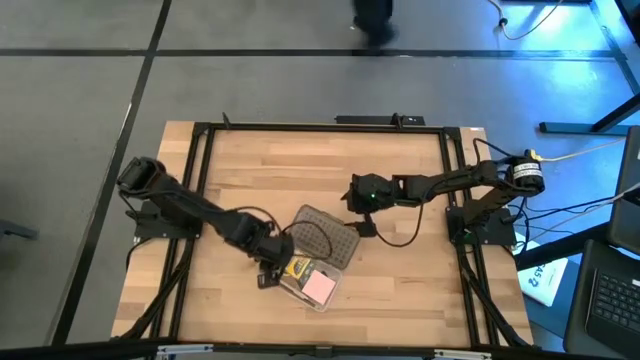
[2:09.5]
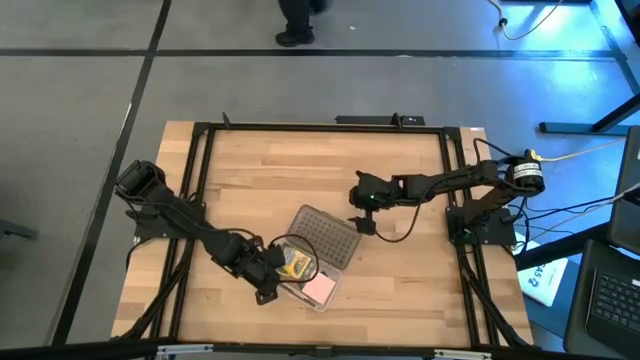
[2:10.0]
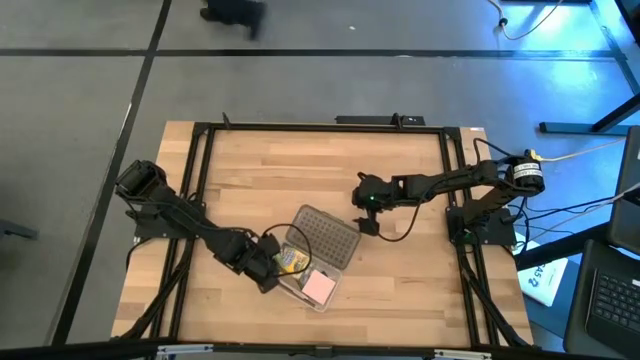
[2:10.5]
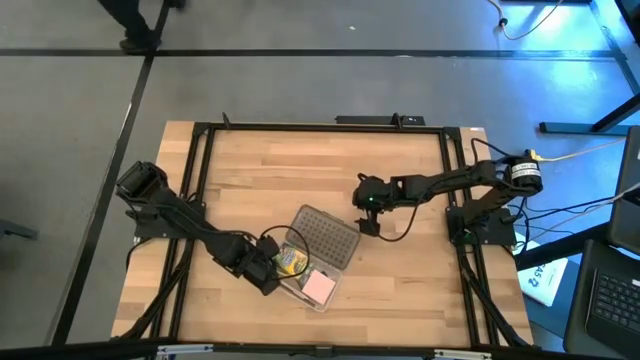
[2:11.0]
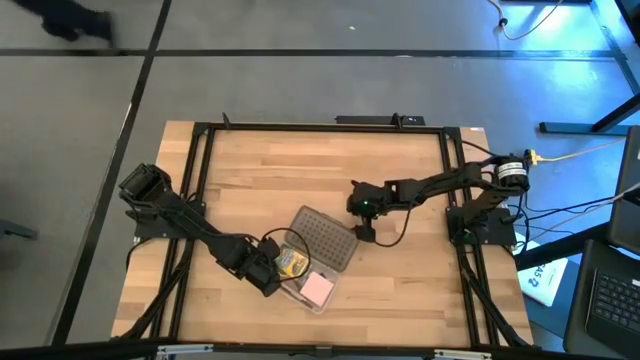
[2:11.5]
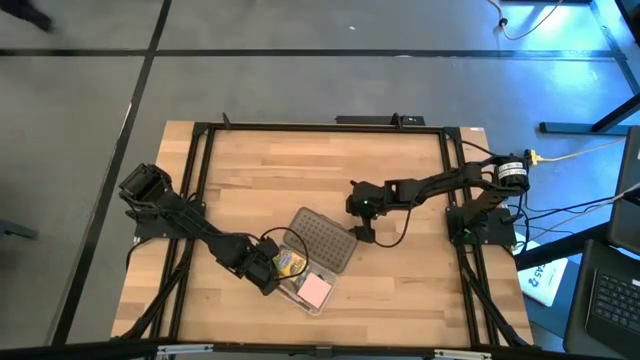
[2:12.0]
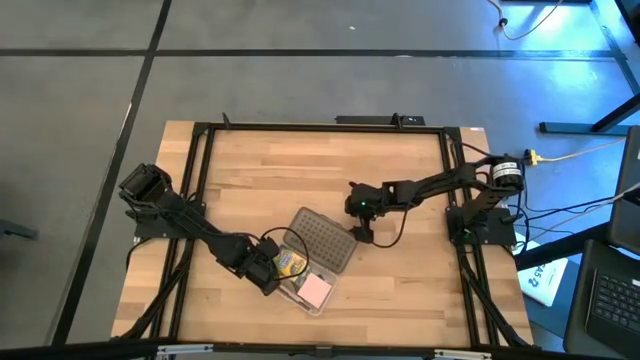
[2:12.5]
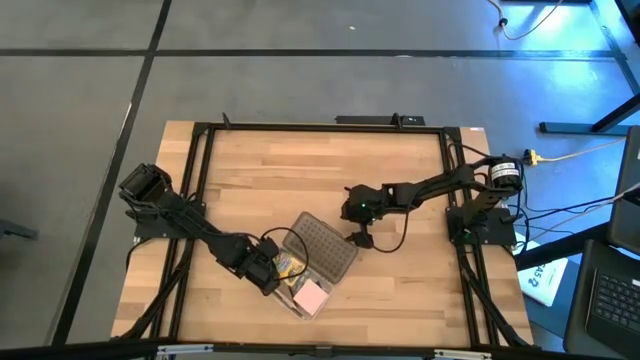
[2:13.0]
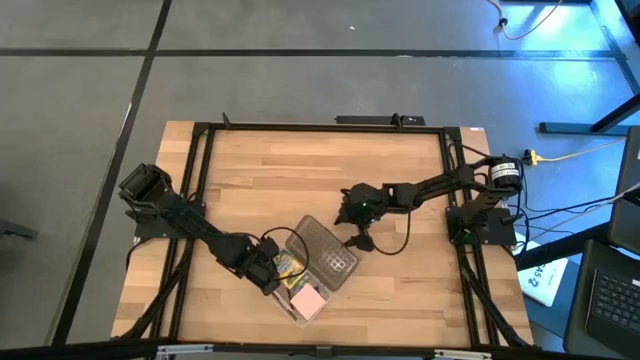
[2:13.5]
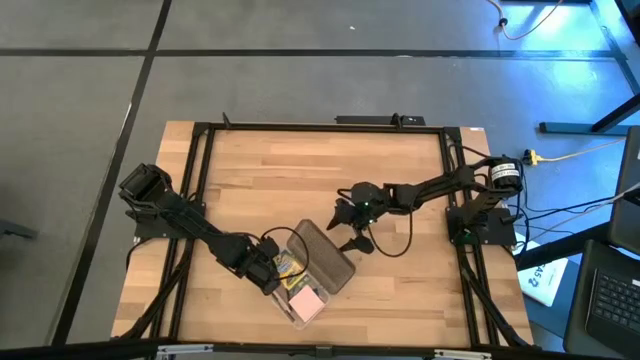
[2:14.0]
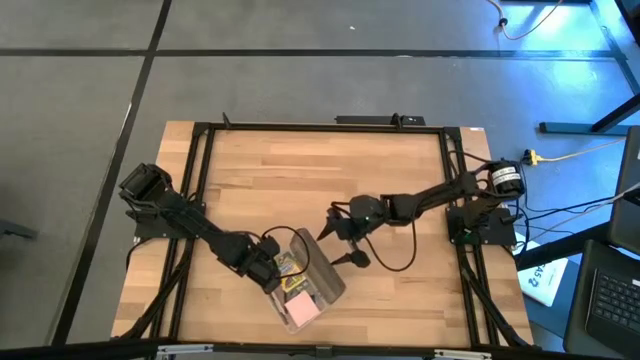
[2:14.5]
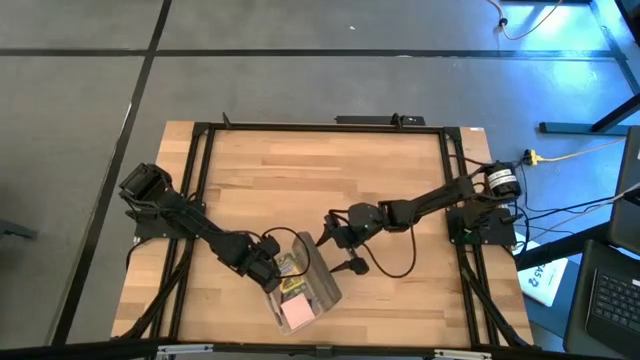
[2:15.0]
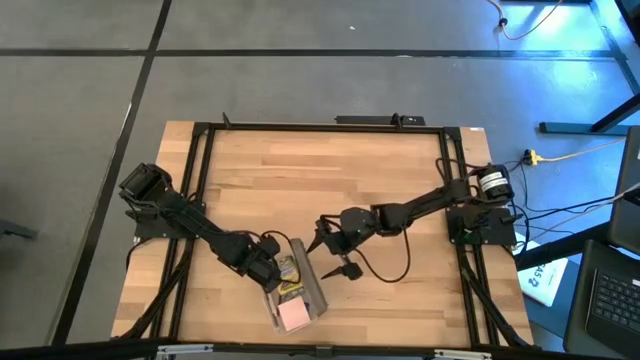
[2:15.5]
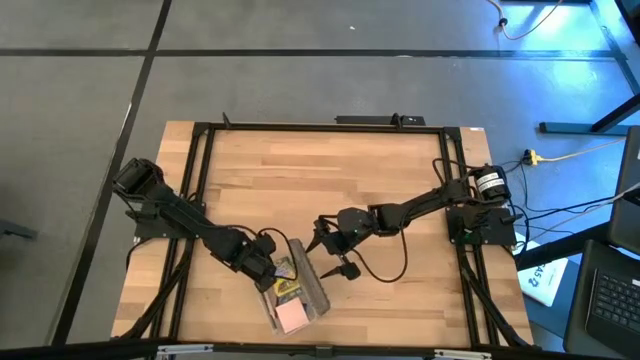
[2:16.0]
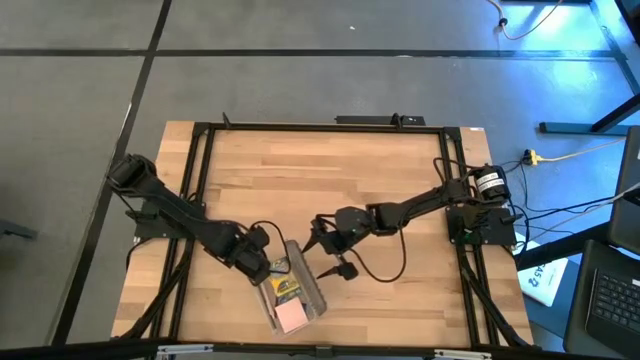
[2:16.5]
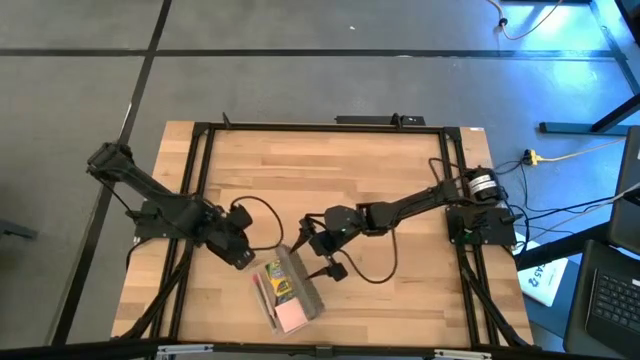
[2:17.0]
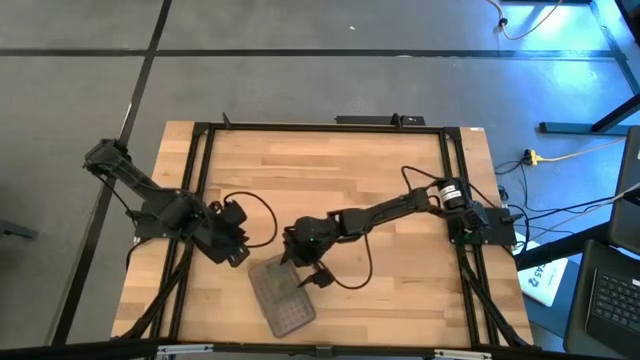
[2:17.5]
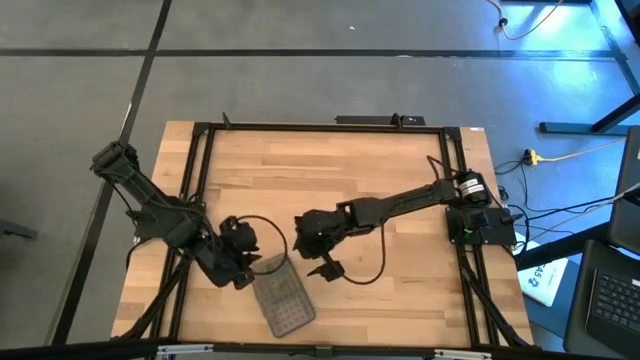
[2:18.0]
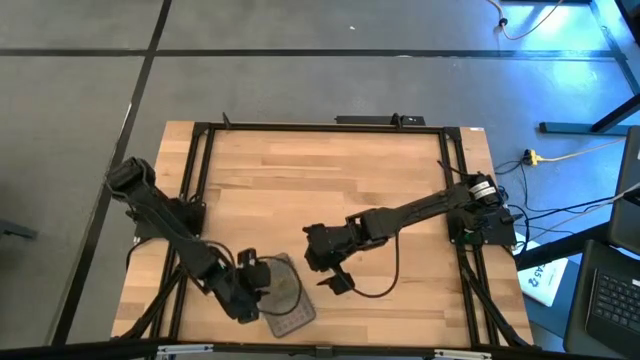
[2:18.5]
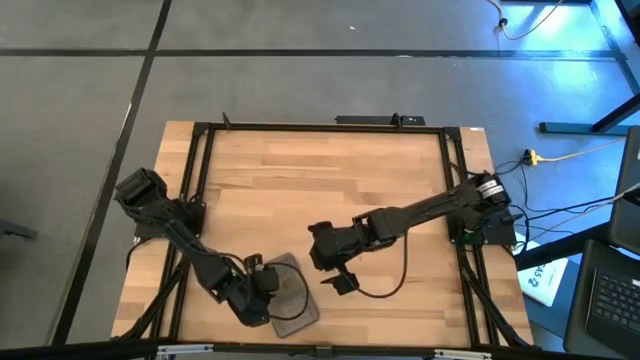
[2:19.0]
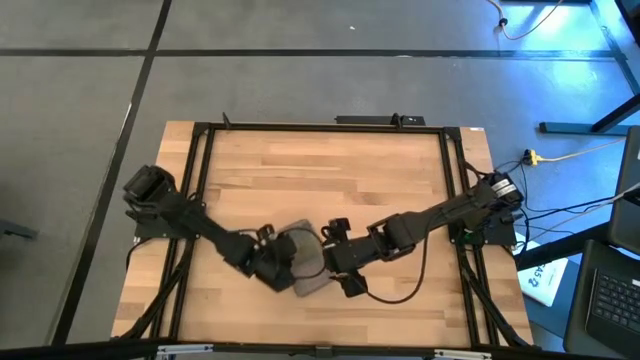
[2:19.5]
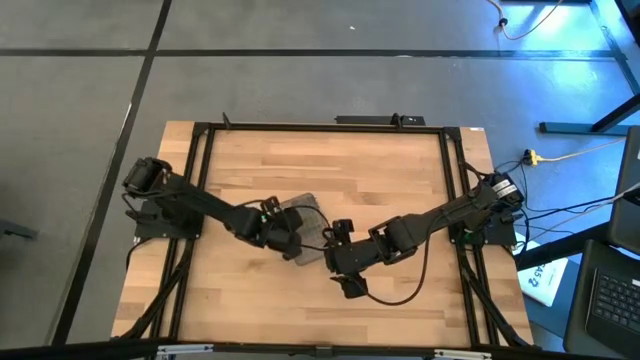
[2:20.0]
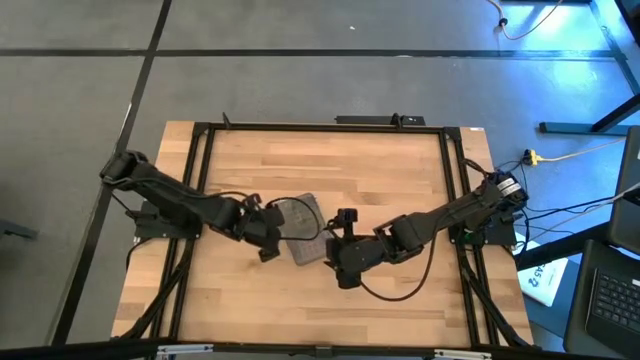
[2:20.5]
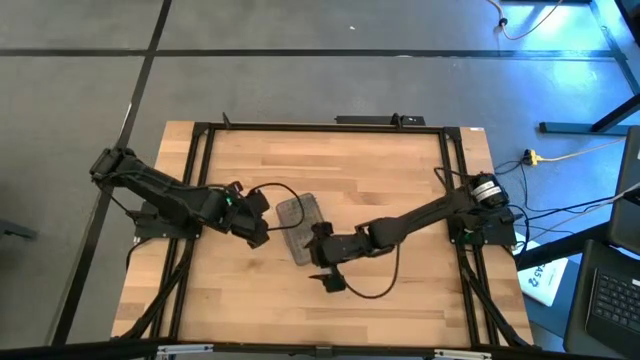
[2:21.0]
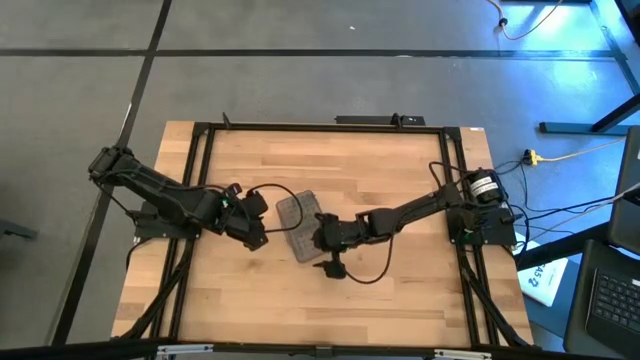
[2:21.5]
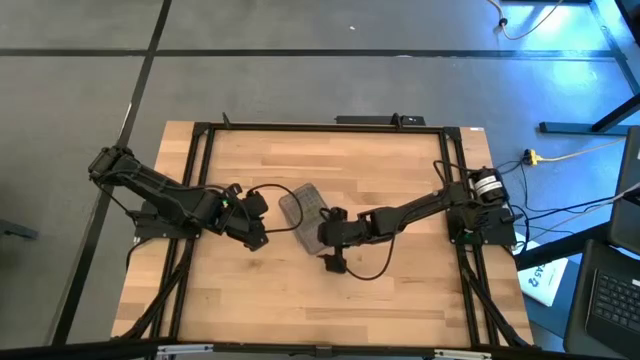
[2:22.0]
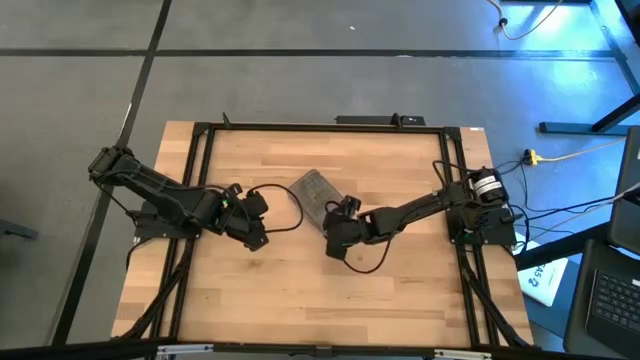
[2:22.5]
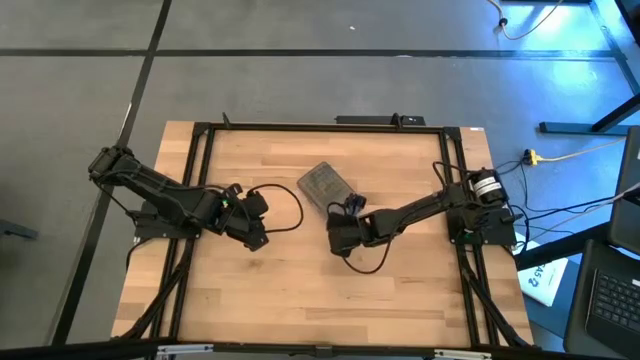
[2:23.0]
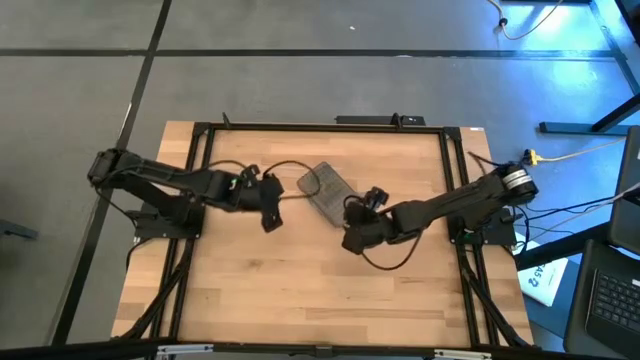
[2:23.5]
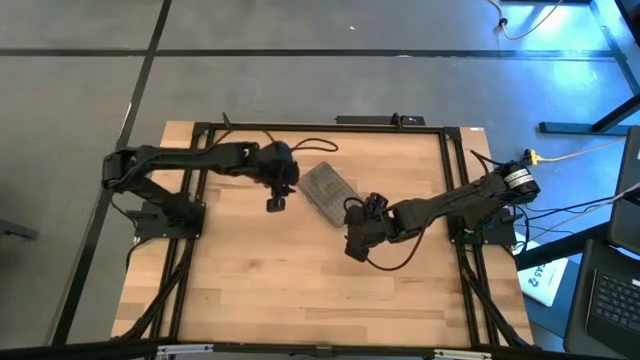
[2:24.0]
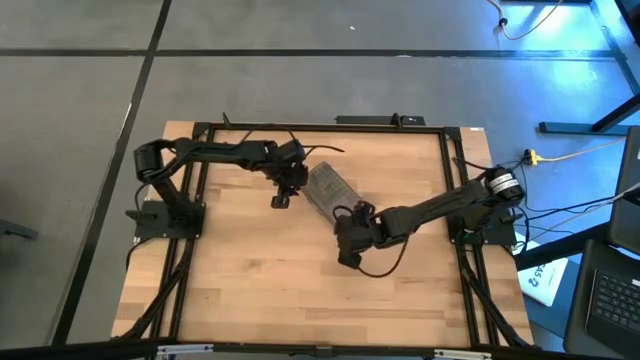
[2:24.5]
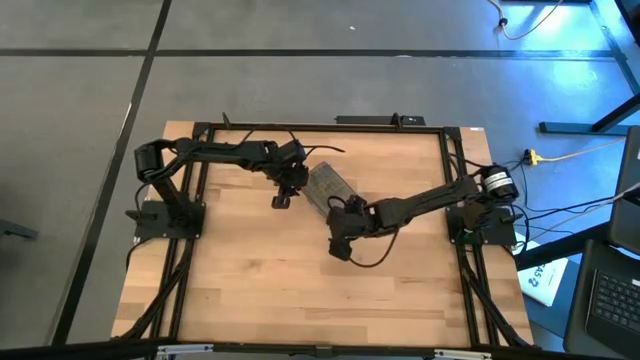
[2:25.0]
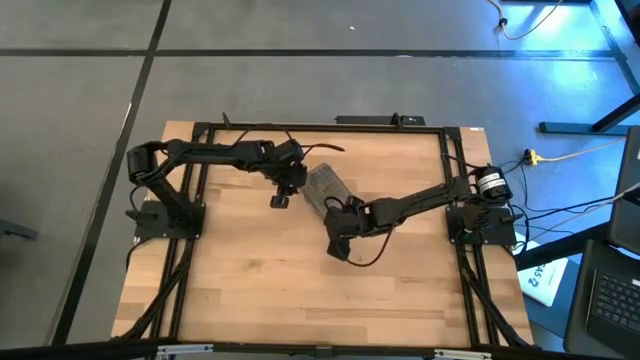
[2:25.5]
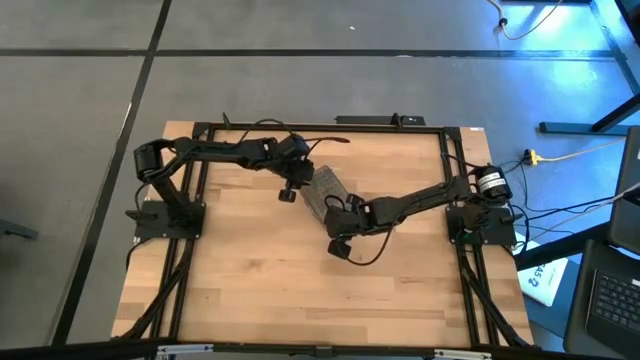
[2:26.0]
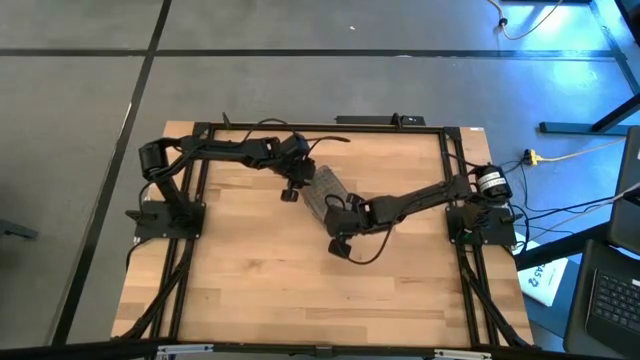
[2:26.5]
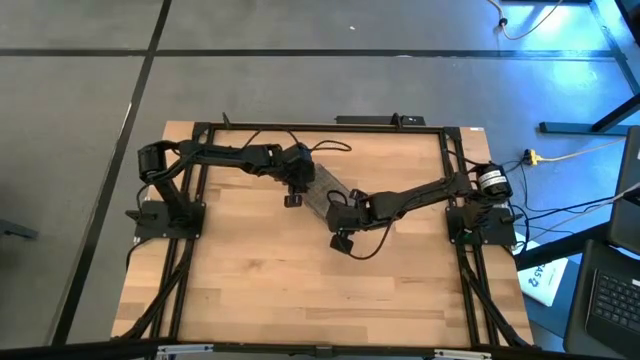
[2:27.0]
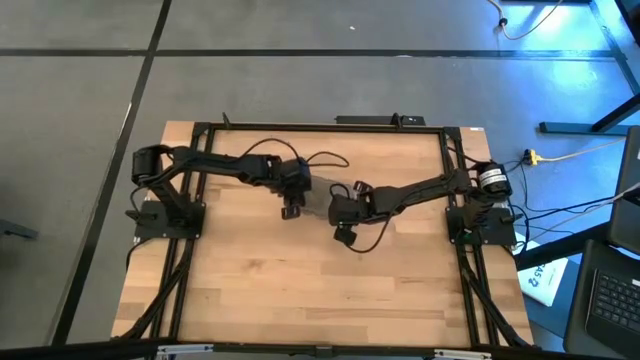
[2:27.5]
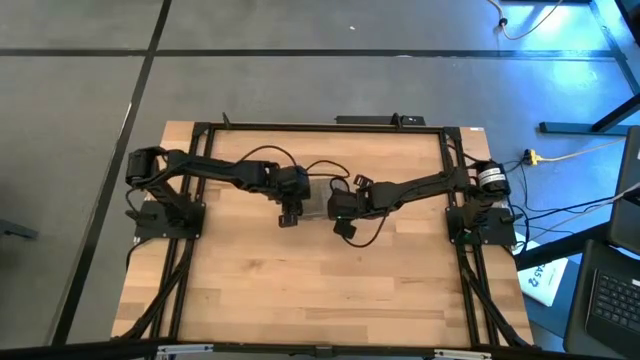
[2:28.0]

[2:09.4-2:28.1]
Task: Pack school essentials
Close the supply box
